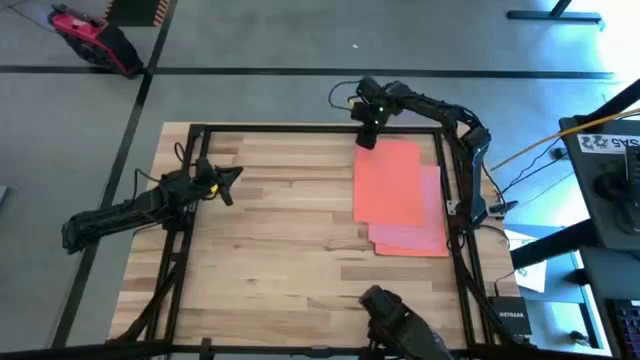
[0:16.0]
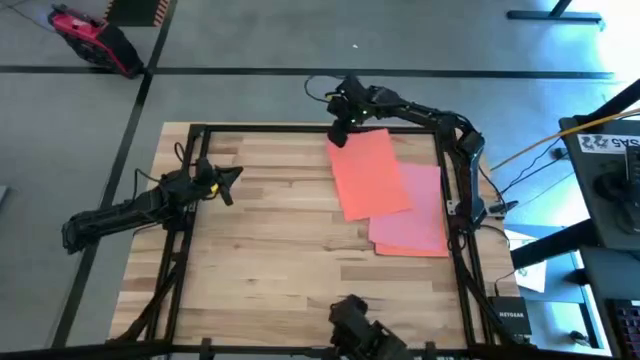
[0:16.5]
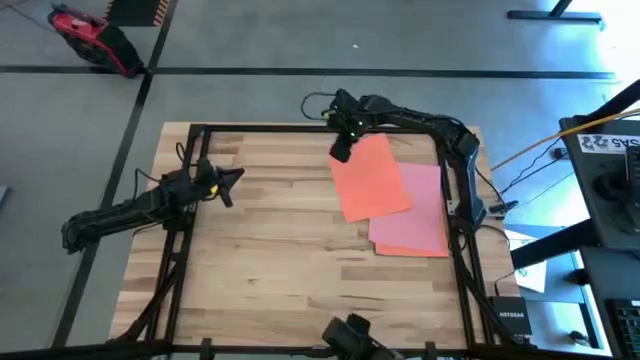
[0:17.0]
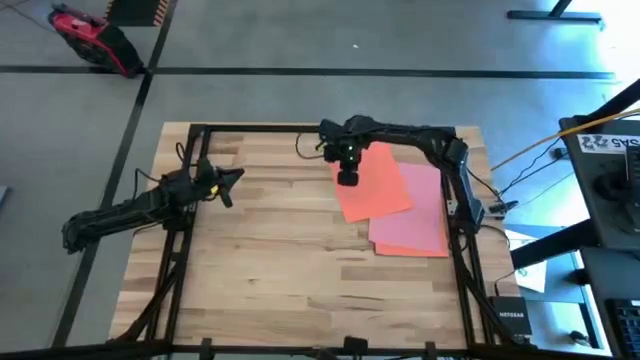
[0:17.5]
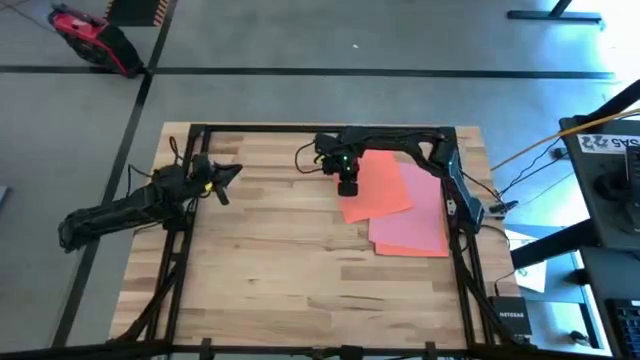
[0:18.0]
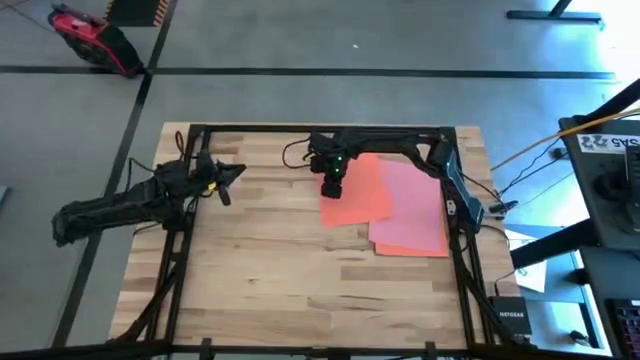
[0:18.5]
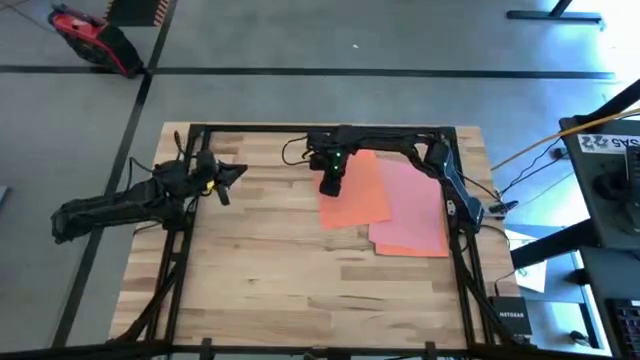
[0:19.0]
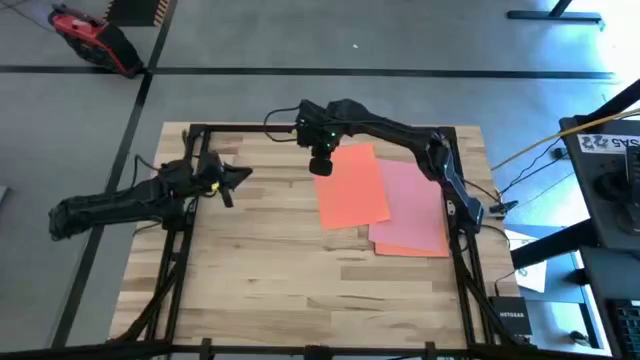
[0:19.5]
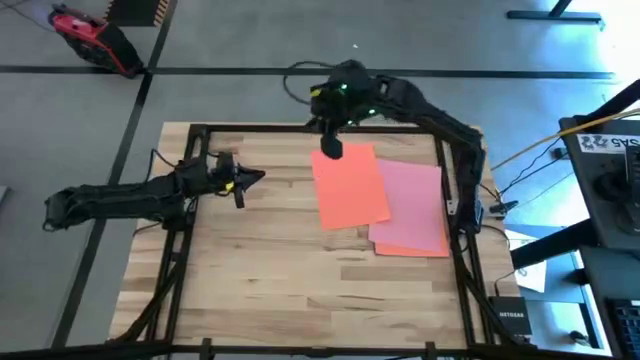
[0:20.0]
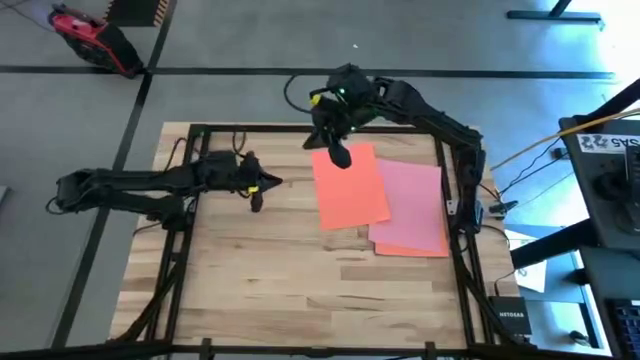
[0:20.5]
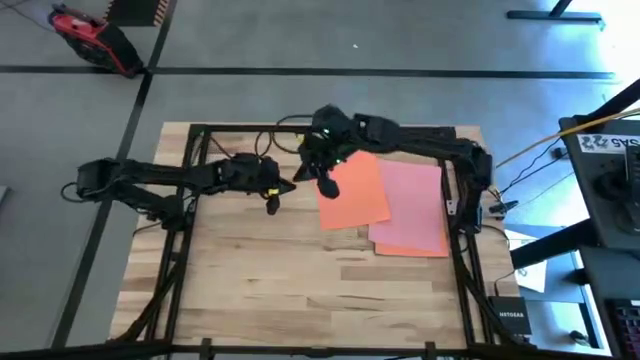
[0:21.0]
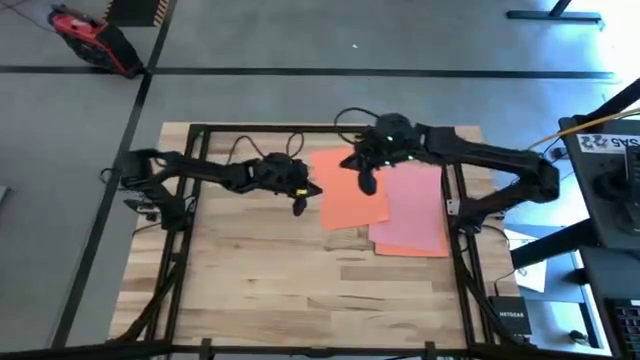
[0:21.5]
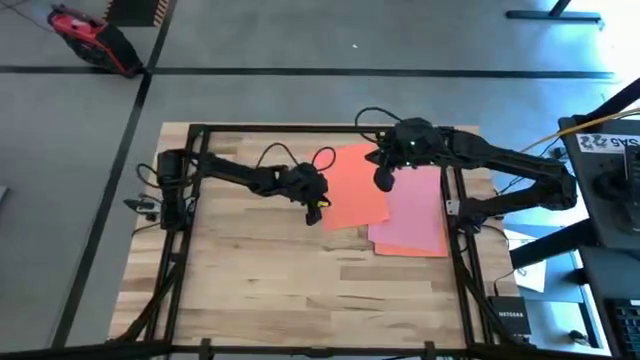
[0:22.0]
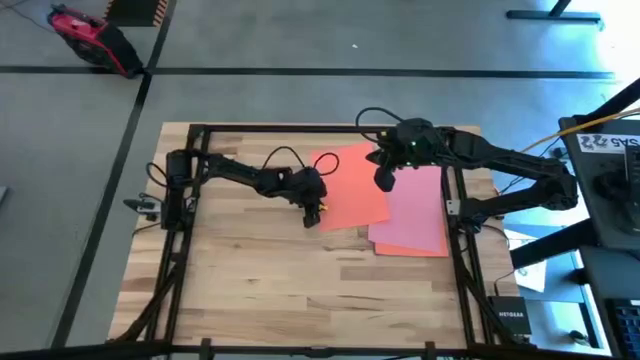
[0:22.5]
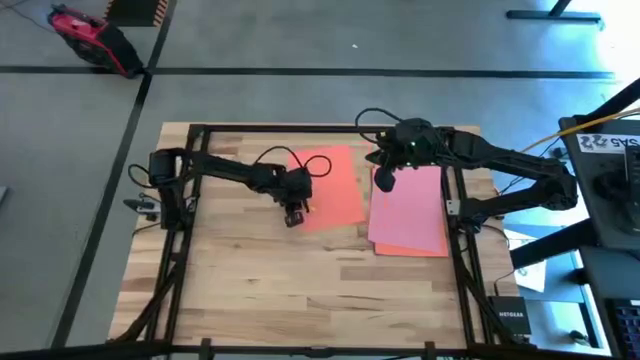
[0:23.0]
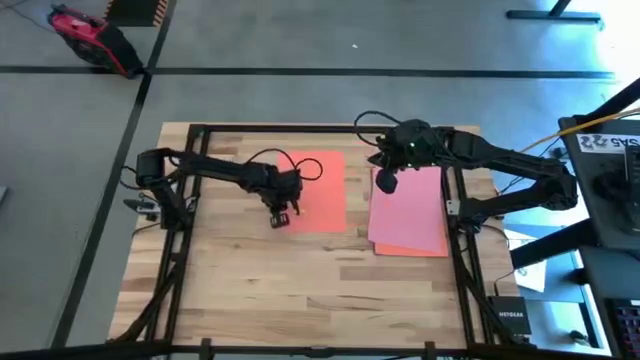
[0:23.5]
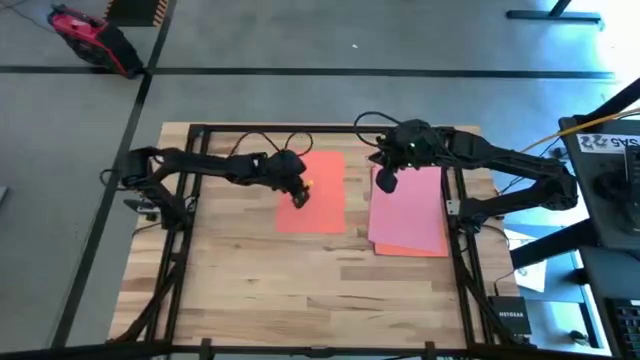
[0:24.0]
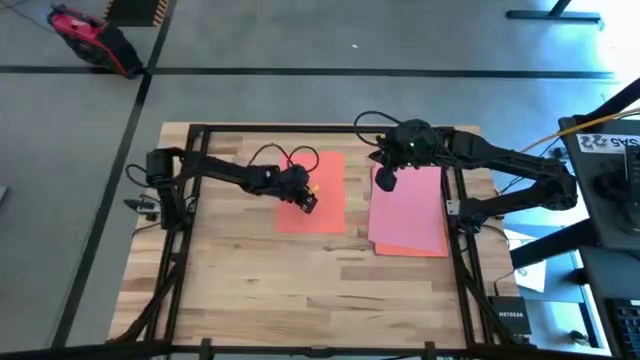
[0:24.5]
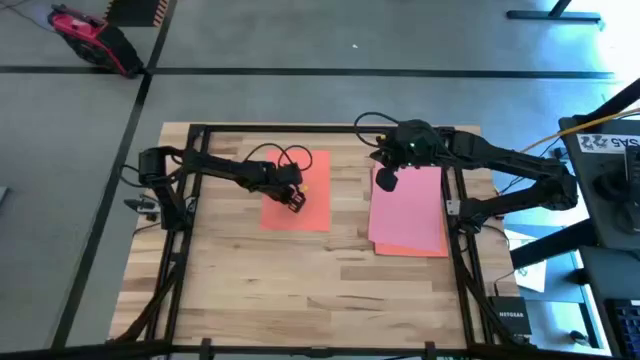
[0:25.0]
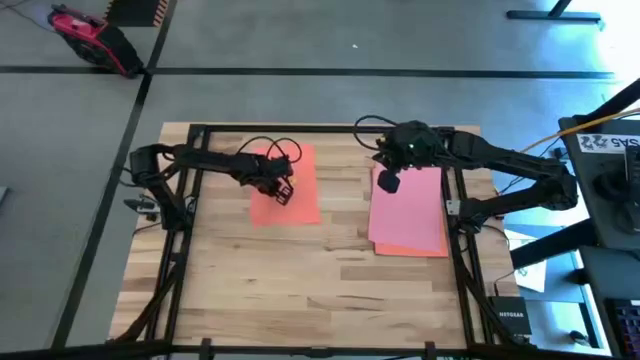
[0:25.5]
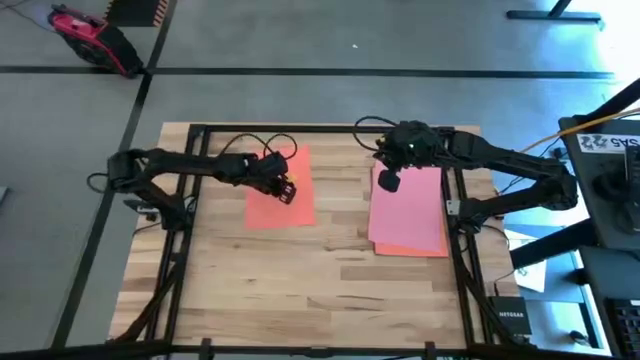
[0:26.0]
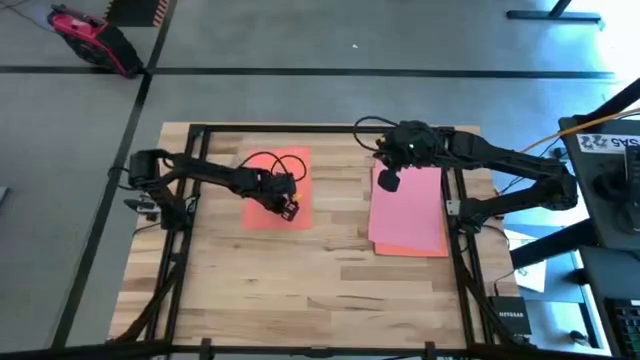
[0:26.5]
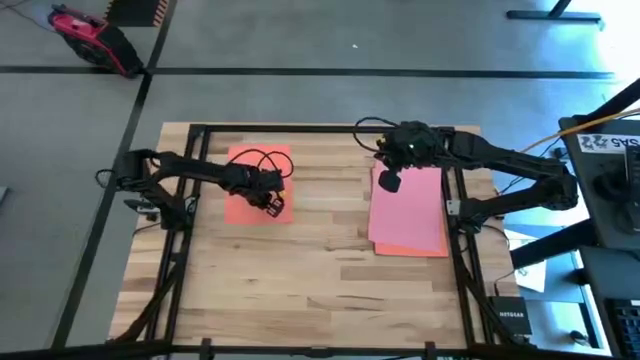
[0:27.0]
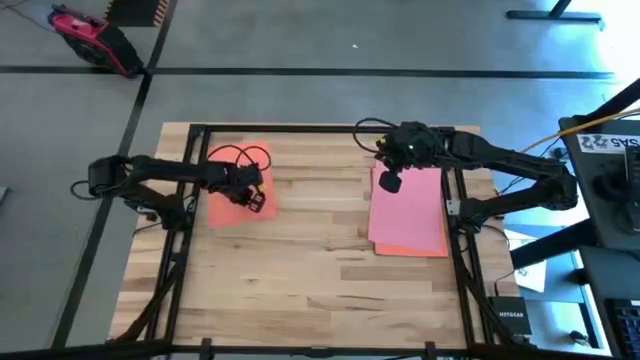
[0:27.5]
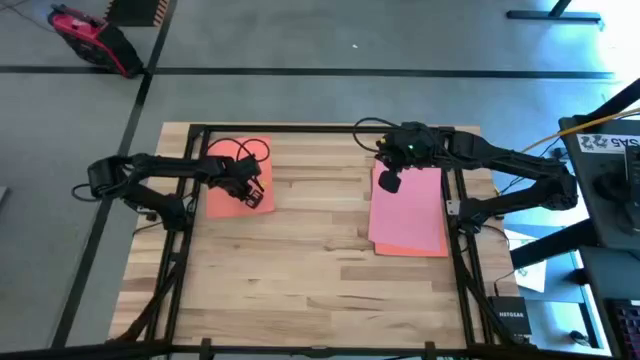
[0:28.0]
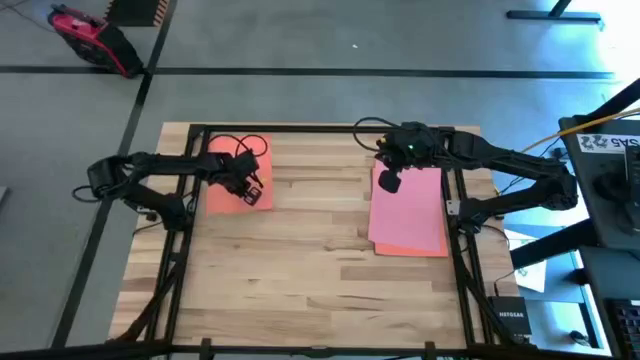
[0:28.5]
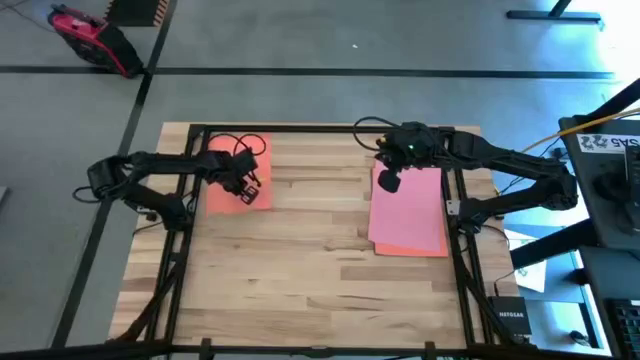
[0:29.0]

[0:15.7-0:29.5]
Task: Organize paper
Move the orange color paper to the top left of the table
